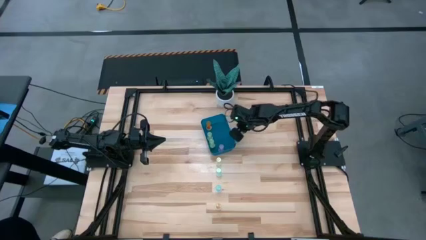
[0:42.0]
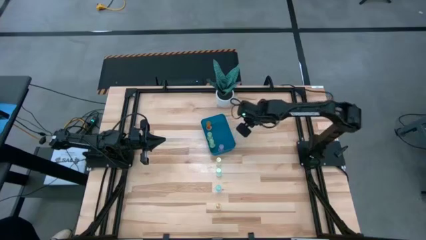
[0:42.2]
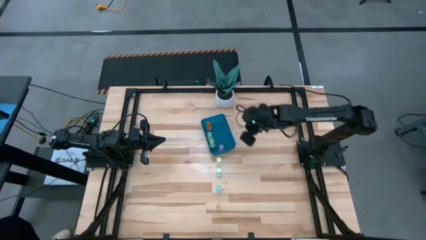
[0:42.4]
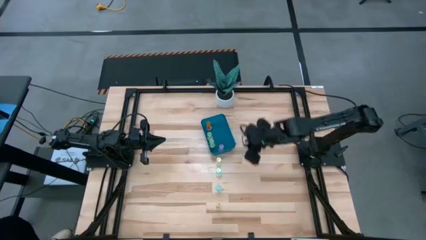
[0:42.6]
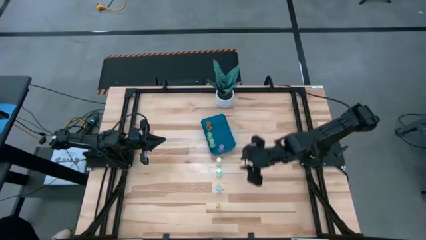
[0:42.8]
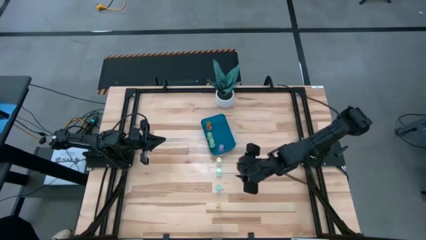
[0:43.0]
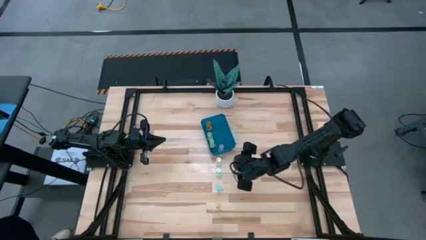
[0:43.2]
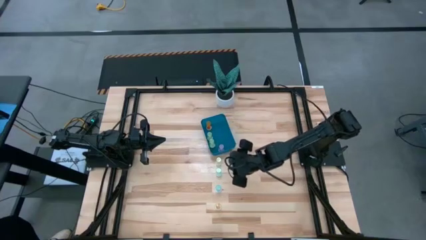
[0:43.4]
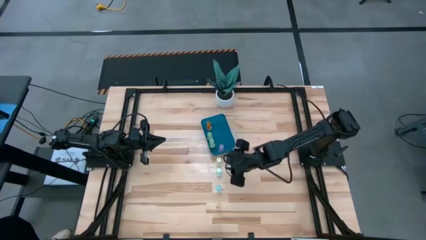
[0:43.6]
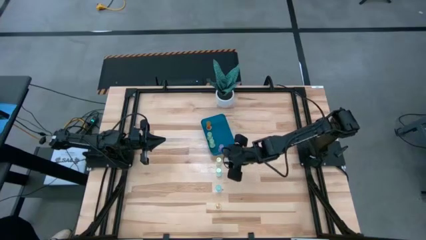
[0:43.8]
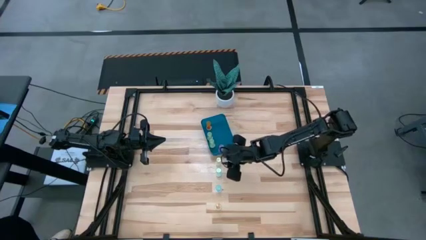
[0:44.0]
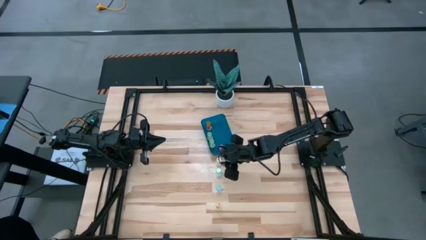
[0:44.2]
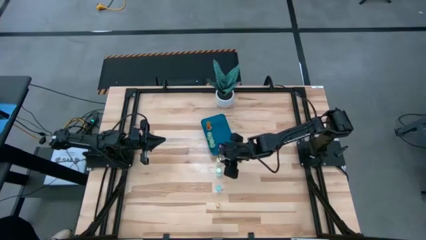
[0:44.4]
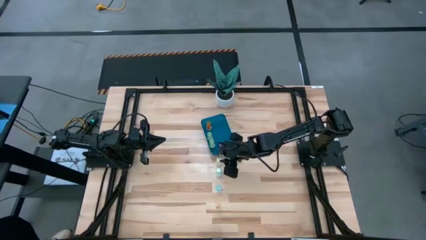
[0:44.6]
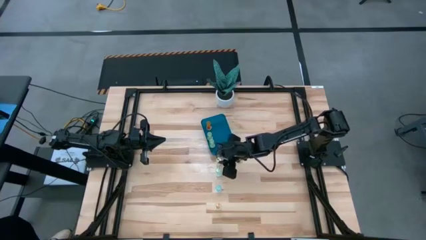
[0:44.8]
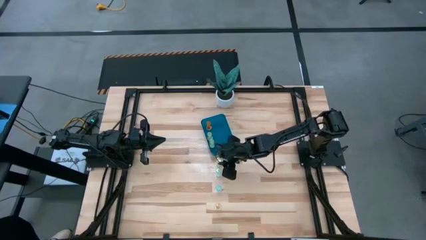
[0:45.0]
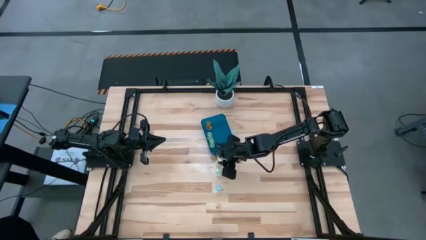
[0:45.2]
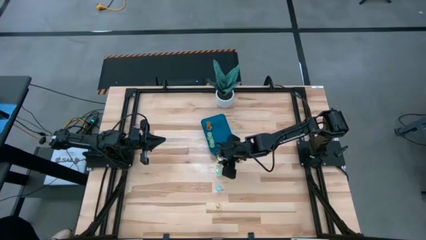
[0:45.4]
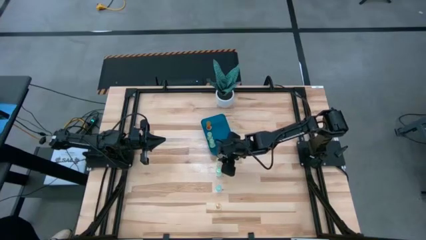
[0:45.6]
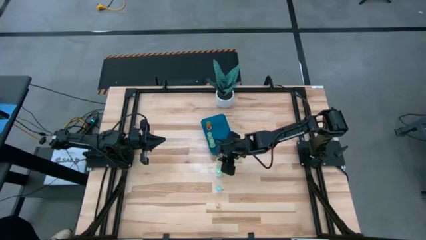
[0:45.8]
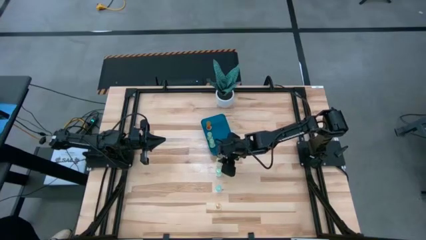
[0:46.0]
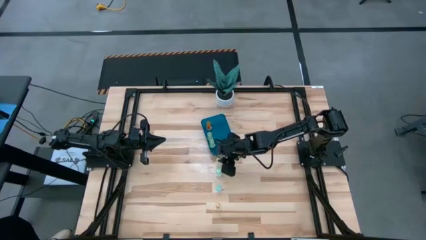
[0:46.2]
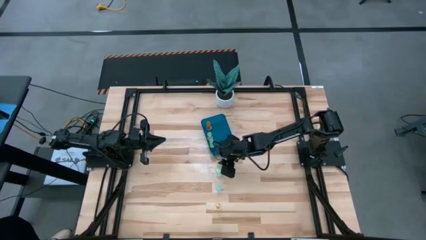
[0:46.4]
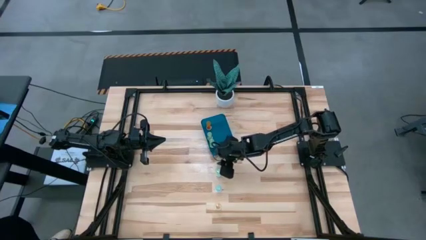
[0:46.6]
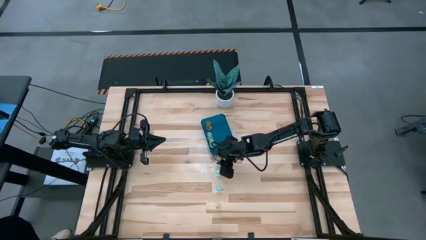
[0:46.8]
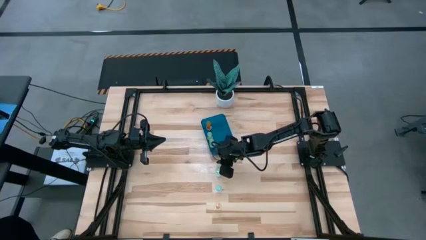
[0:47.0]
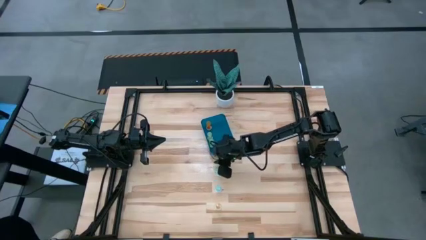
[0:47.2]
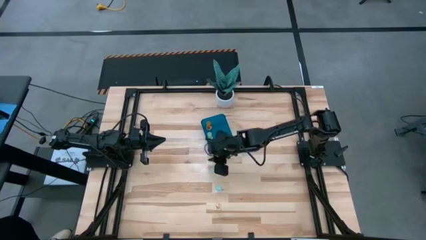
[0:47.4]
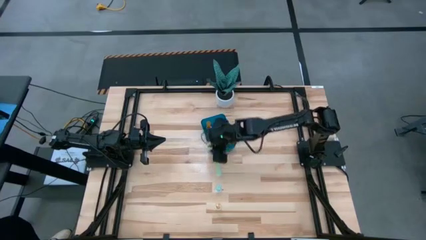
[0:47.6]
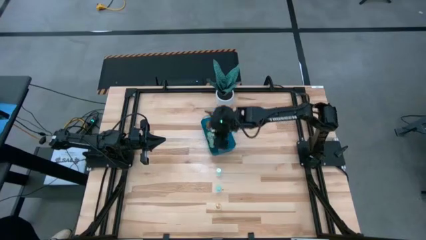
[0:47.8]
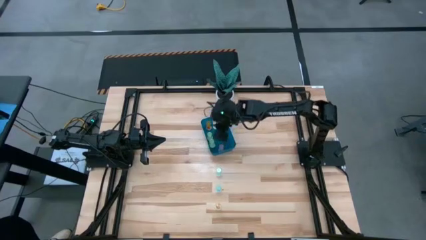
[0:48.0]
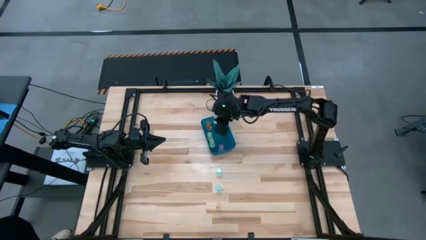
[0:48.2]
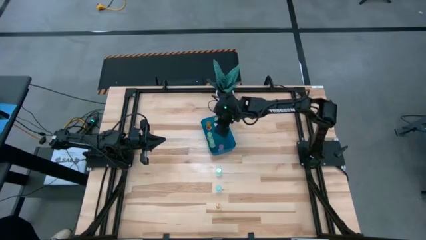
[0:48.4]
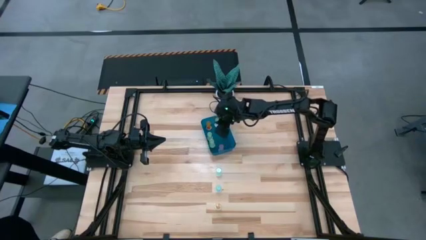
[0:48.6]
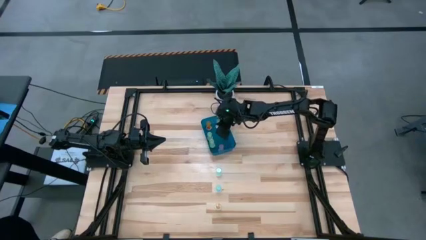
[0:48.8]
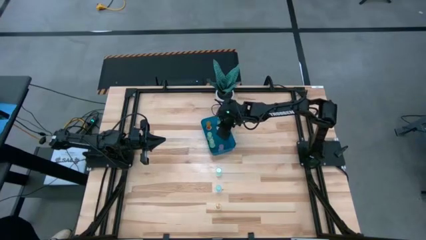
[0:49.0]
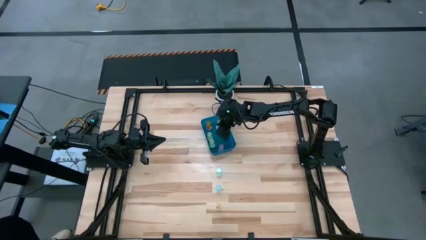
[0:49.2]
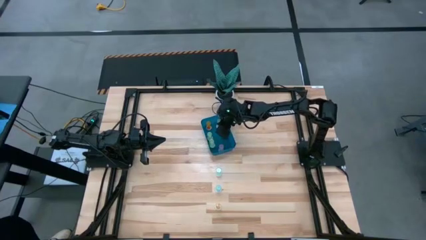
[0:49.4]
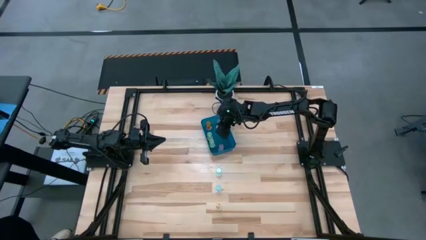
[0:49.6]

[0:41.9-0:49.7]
Task: Pick and place pill bottles into a basket
Put the top green pill bottle into the blue bin

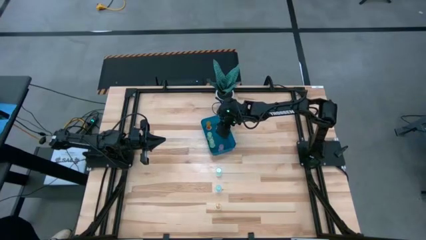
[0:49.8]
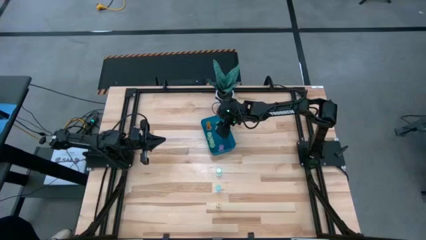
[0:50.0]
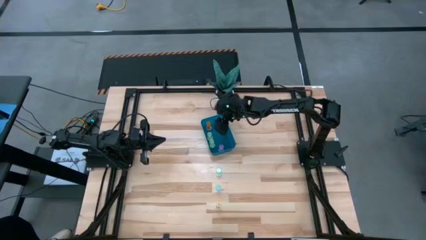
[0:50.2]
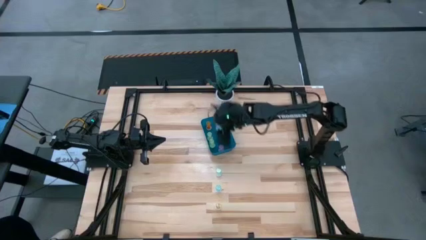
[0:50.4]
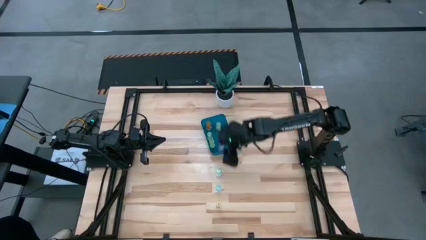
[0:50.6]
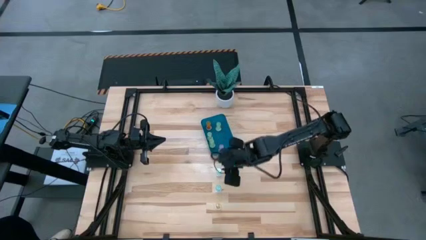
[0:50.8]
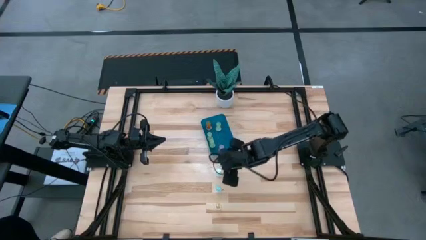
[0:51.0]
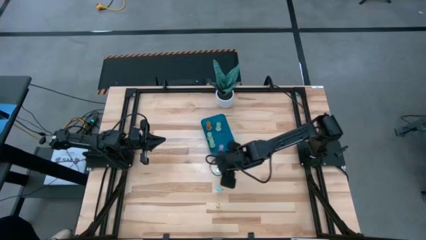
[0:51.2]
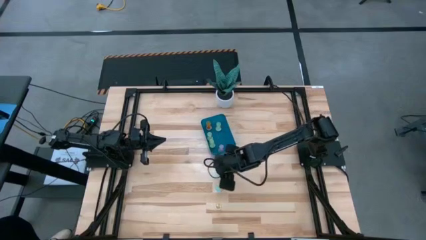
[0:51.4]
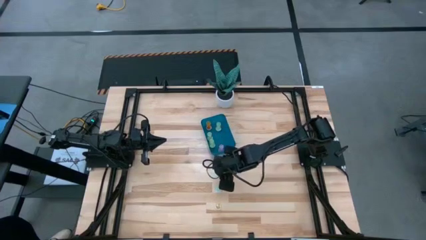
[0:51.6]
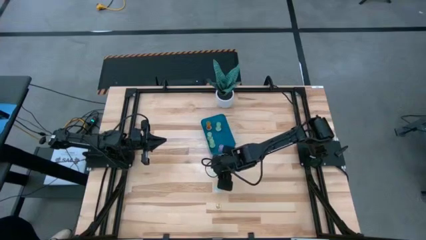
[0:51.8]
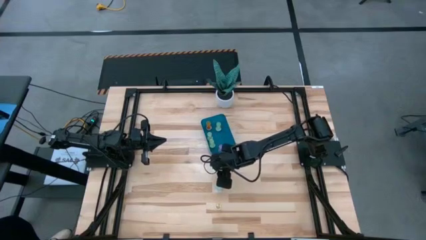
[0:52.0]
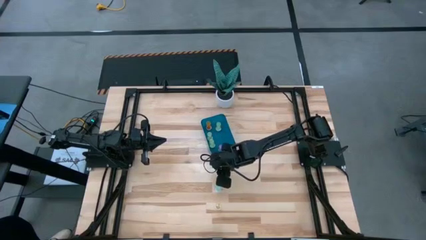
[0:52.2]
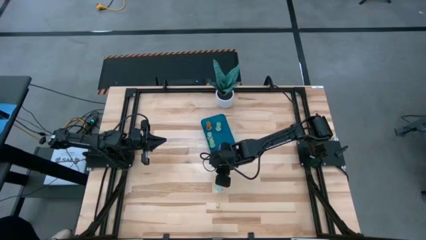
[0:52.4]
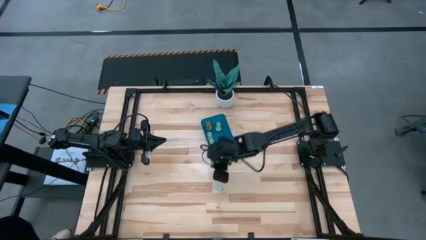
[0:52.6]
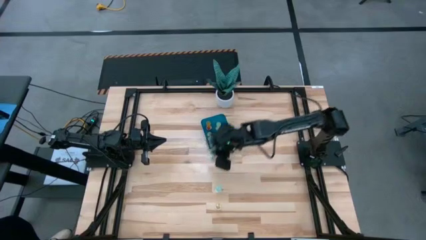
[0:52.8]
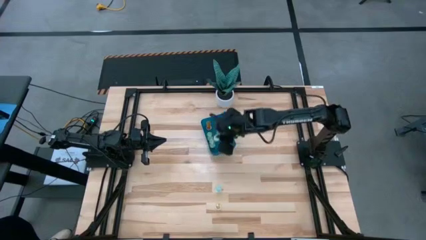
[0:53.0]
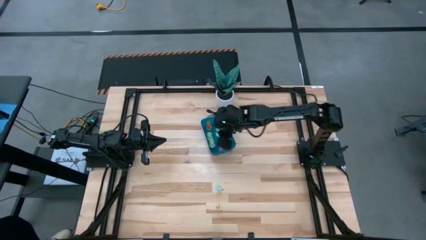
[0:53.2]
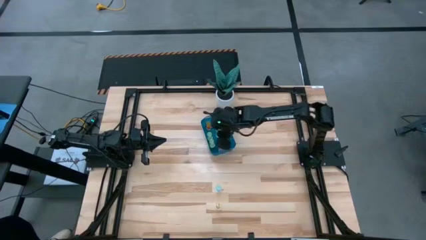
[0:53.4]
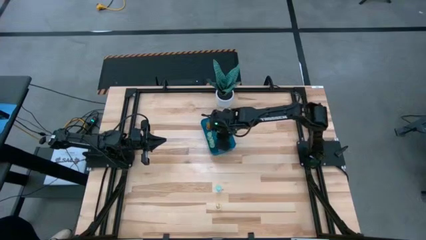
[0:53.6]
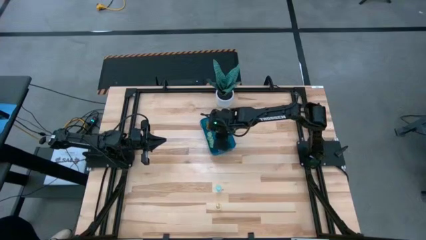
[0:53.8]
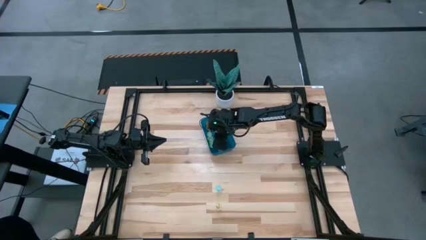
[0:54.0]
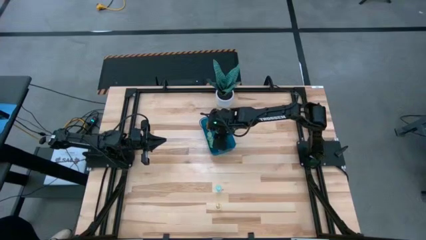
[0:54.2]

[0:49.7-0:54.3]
Put the top blue pill bottle into the blue bin

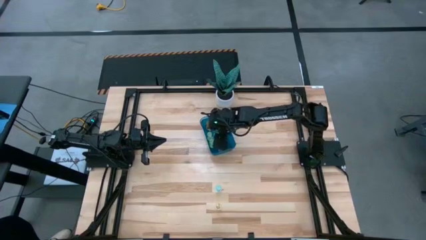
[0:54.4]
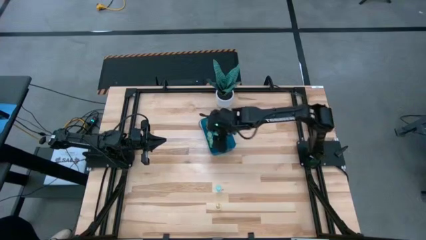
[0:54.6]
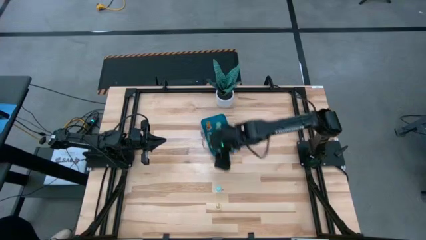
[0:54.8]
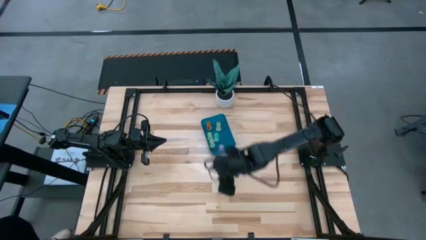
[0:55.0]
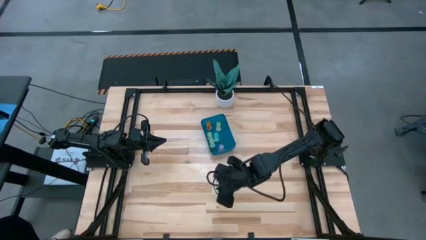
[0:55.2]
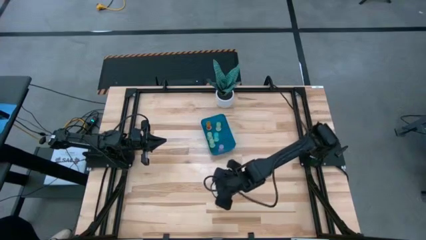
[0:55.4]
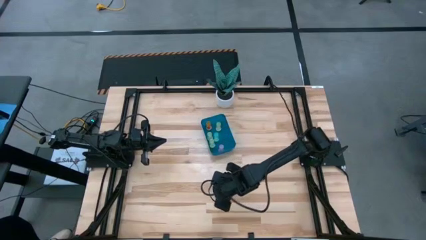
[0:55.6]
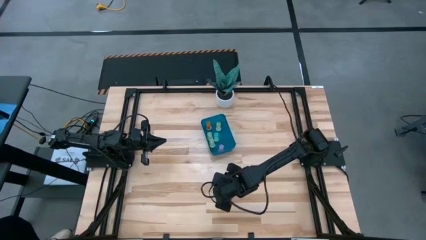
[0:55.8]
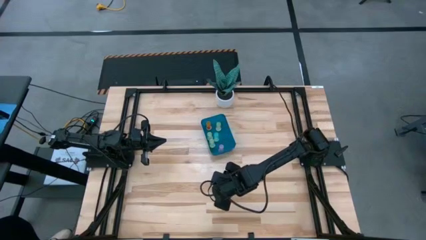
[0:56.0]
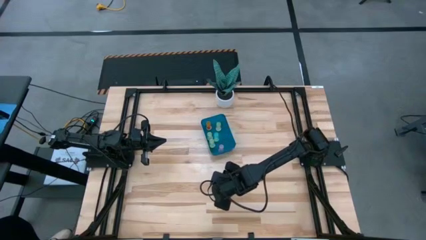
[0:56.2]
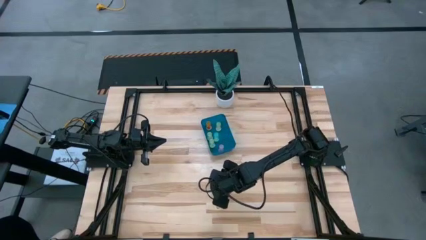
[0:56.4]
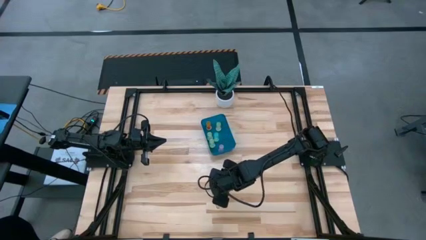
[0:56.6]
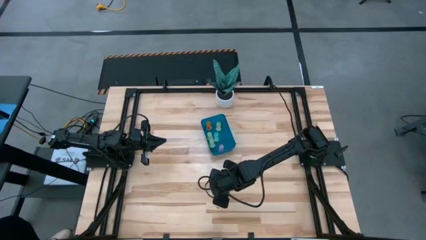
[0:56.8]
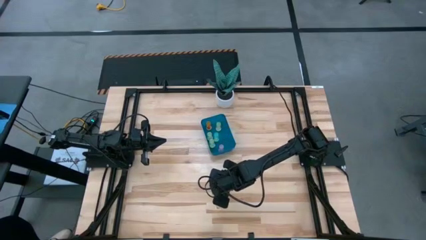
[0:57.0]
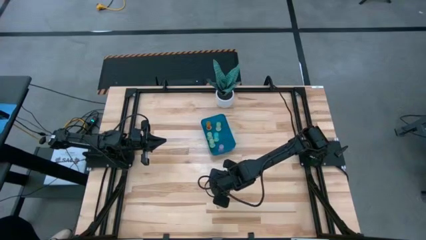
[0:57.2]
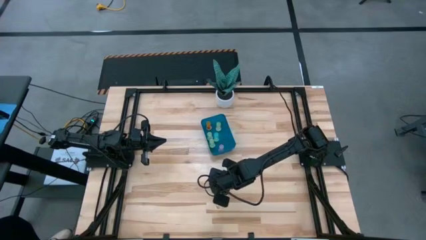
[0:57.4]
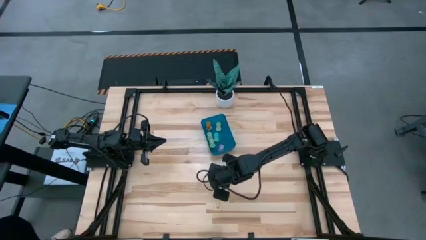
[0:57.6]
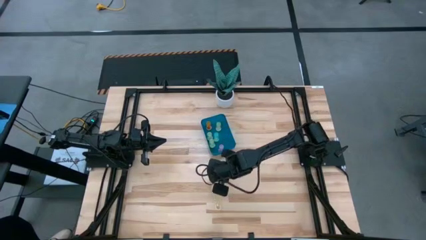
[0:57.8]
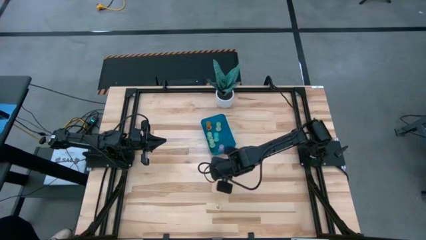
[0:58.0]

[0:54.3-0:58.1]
Put the blue pill bottle into the blue bin

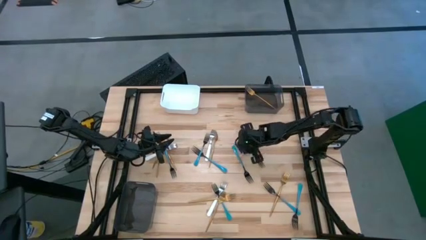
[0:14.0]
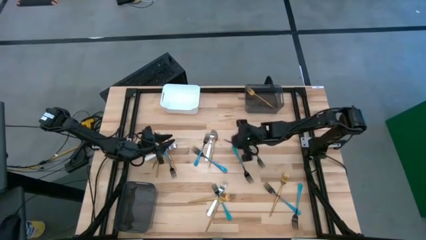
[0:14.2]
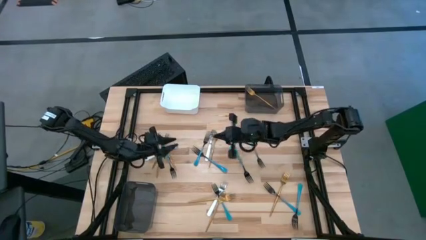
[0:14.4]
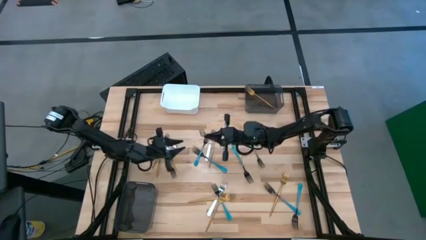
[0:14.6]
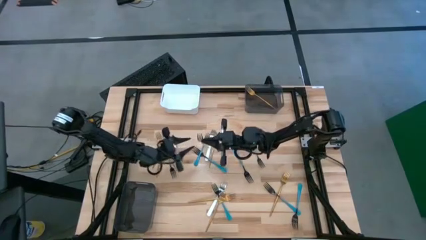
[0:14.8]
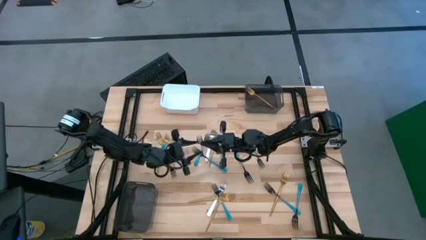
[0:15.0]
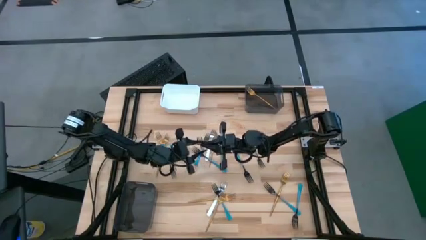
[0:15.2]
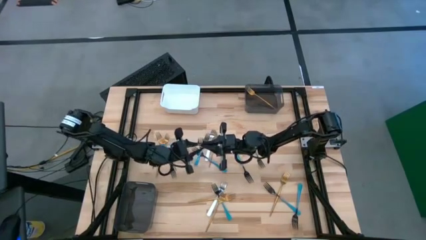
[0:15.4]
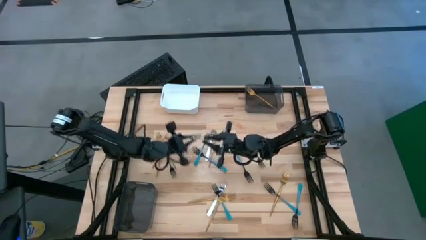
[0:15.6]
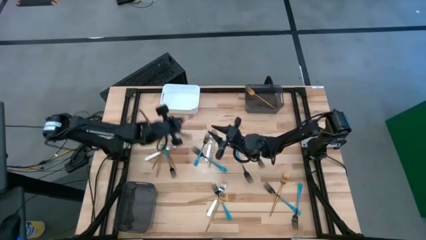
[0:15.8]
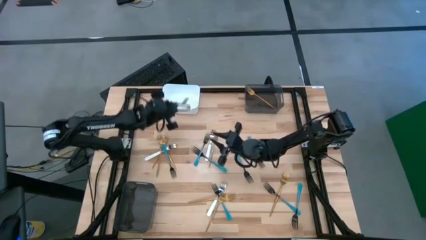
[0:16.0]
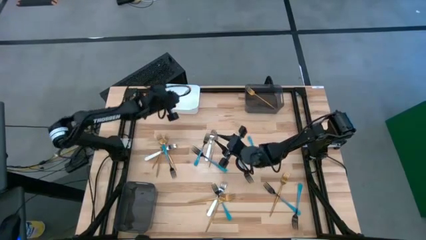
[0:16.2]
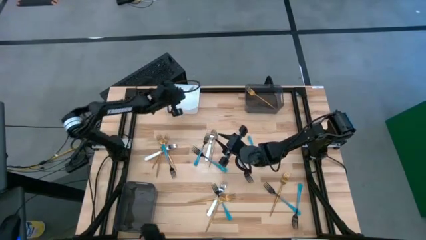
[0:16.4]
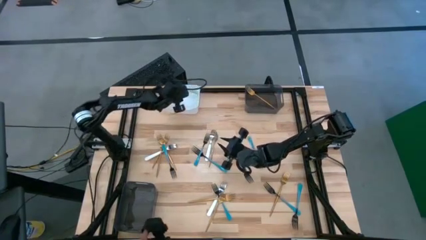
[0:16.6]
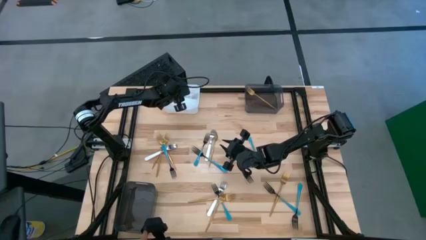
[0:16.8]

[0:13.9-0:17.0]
Task: Sort silverware by color (type)
Put the white fork into the white bin
